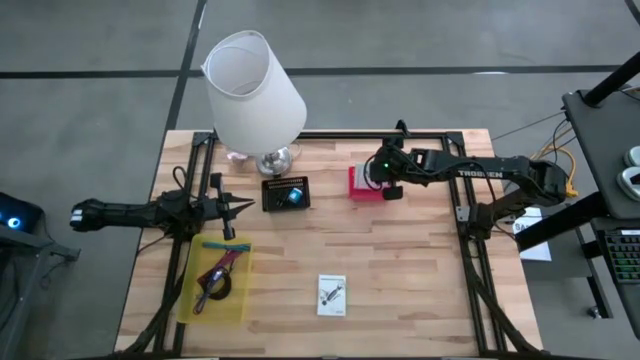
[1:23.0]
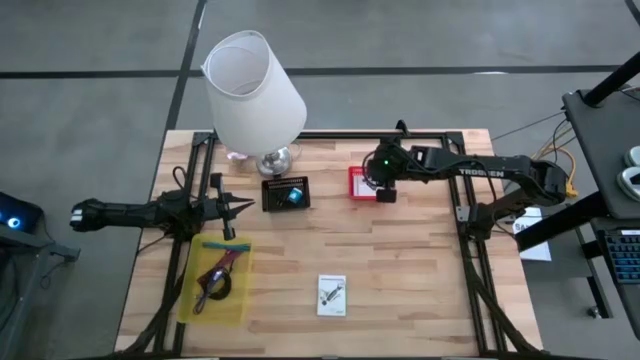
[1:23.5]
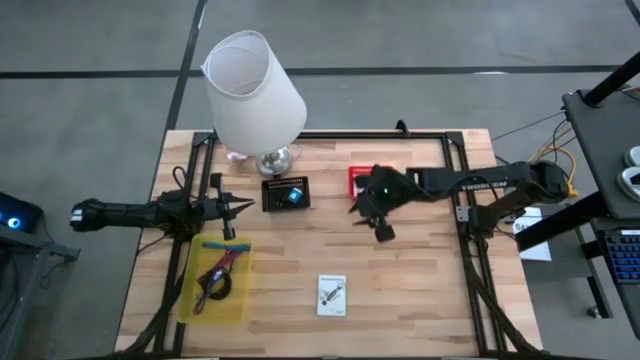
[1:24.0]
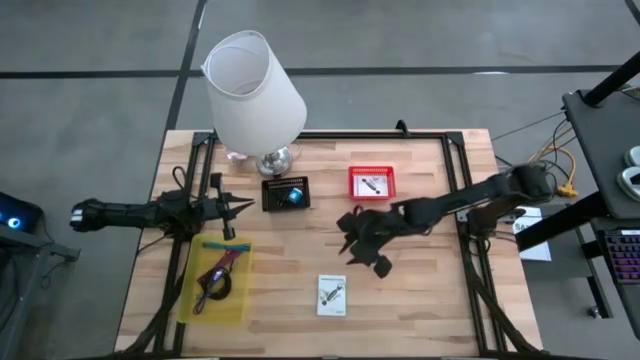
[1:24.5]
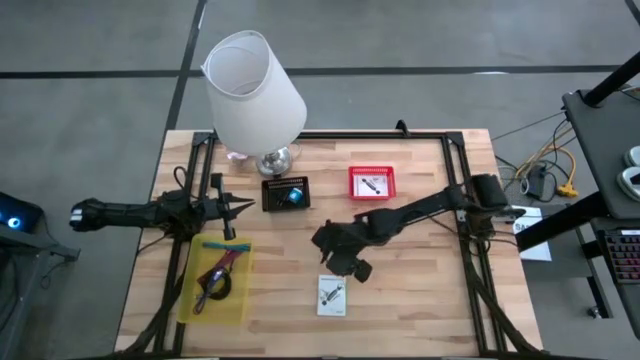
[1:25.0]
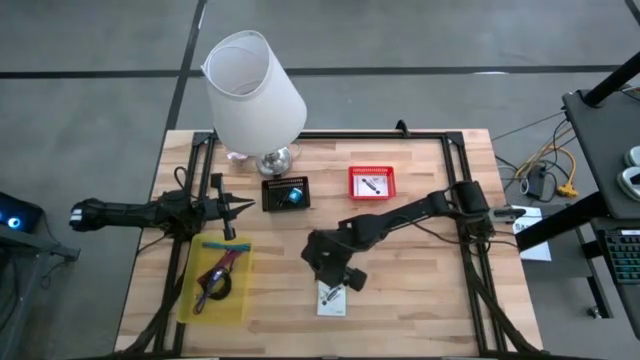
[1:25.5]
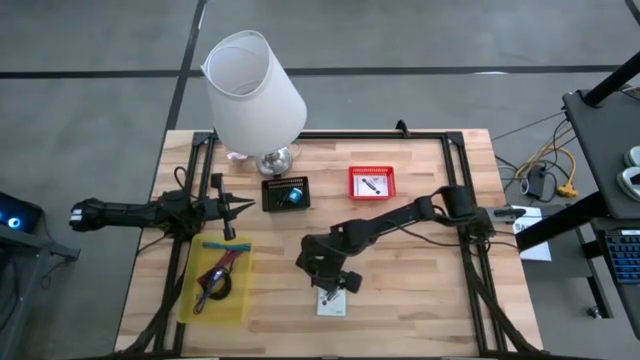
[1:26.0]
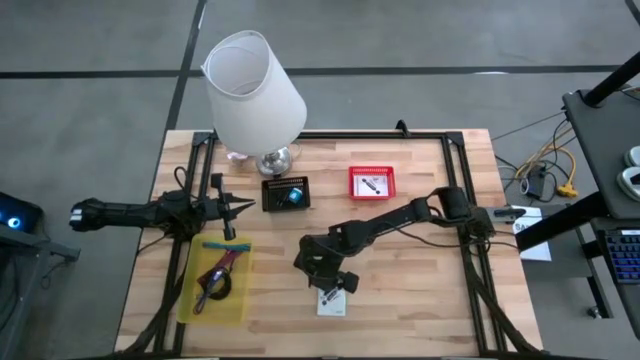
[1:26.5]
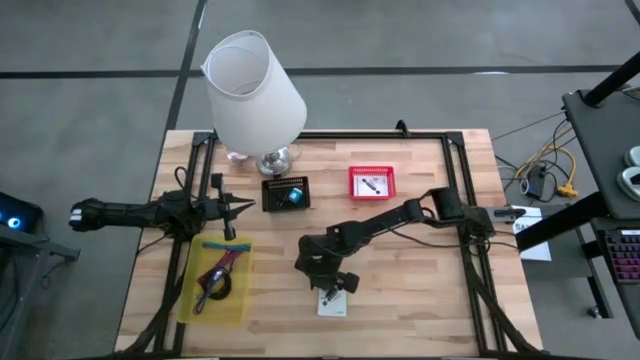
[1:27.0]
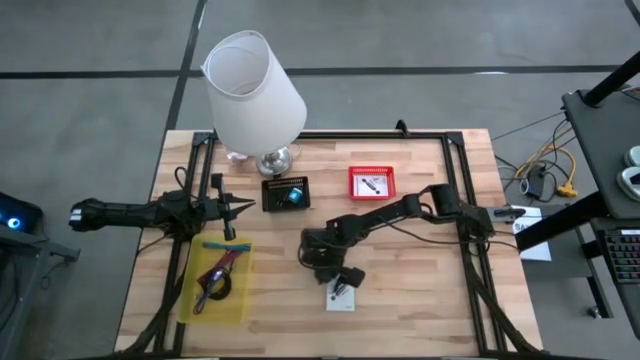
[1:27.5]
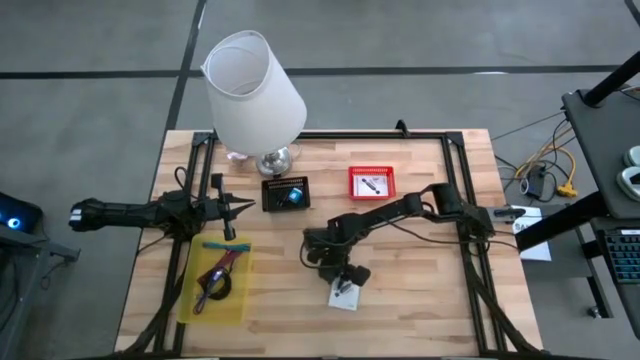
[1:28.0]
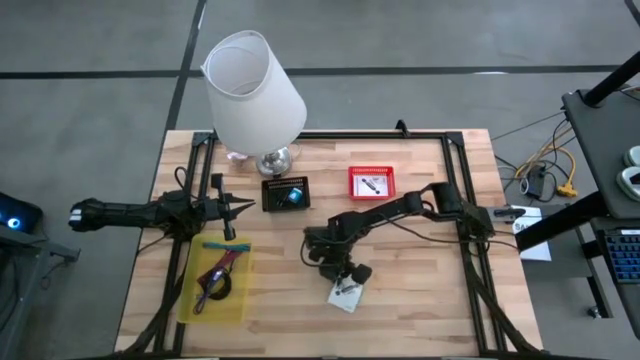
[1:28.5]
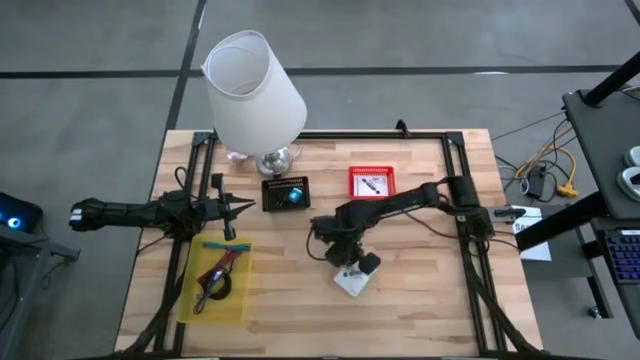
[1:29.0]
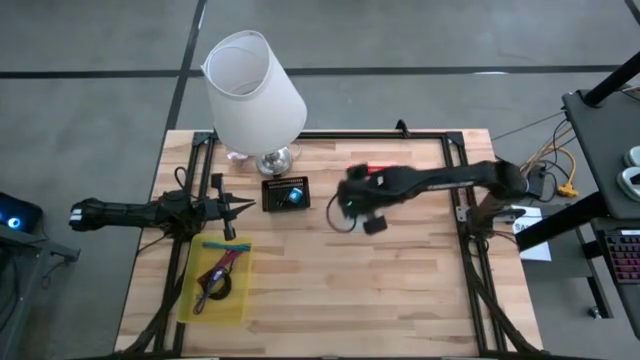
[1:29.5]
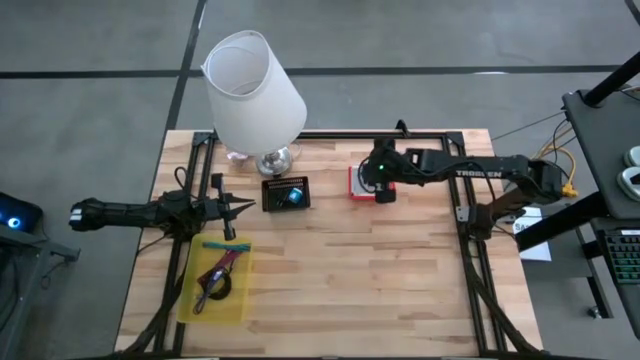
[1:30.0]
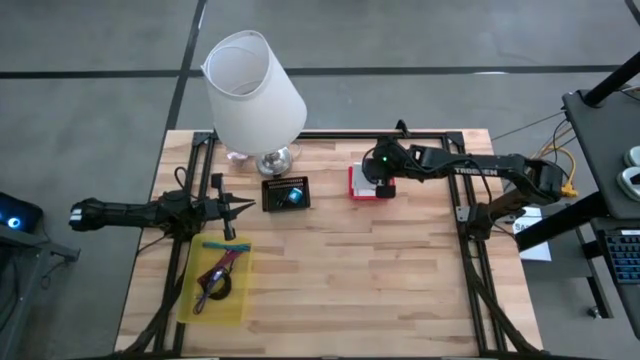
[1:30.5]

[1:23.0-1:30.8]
Task: Pick and place items into bin
Put the card reader box into the red bin

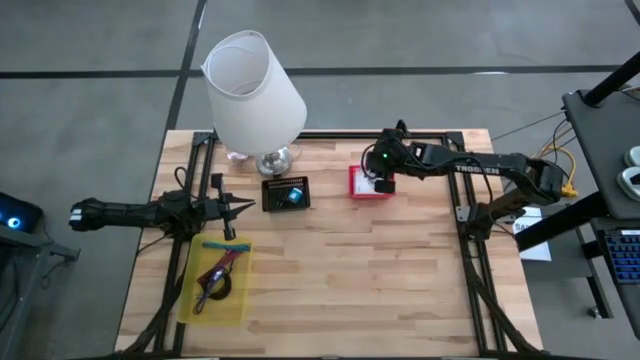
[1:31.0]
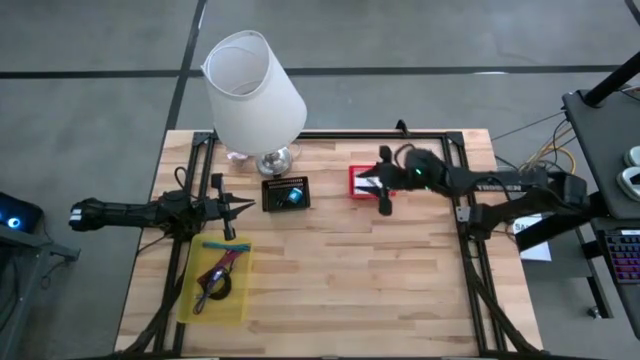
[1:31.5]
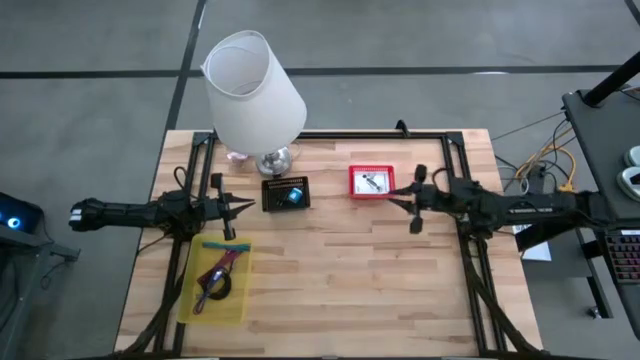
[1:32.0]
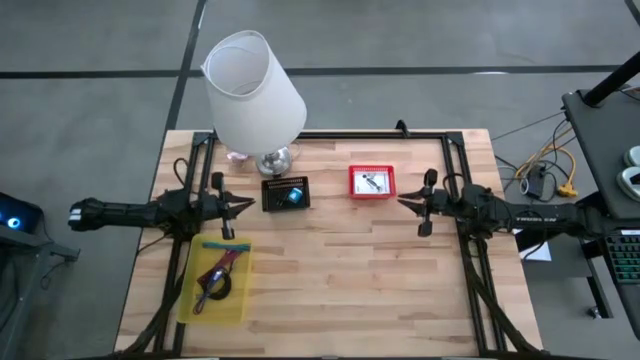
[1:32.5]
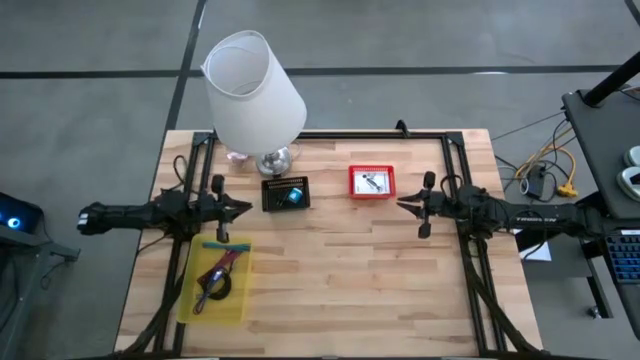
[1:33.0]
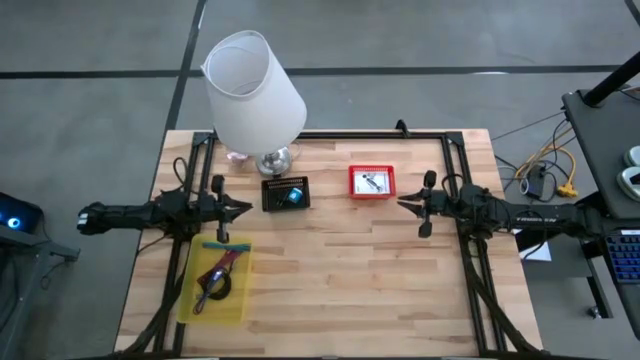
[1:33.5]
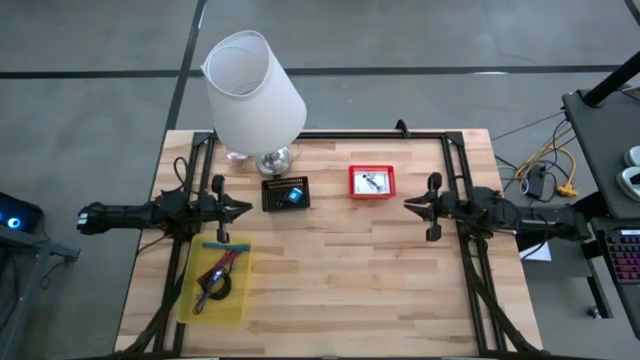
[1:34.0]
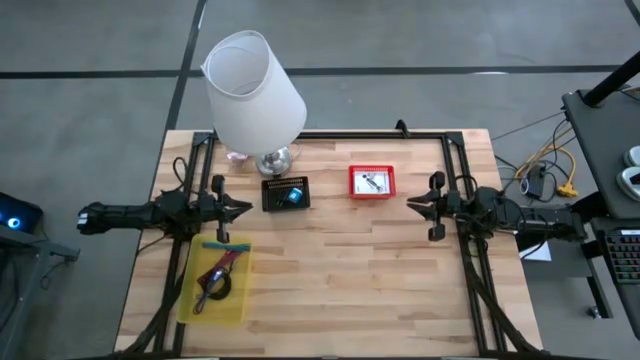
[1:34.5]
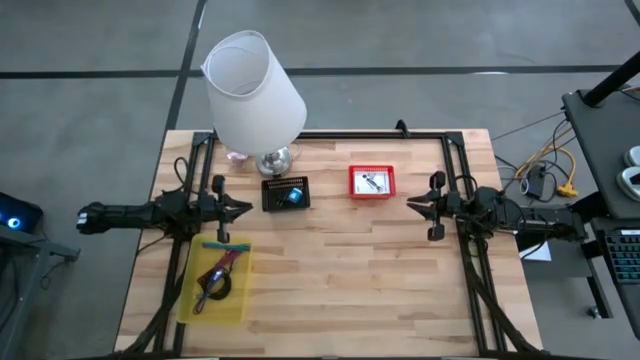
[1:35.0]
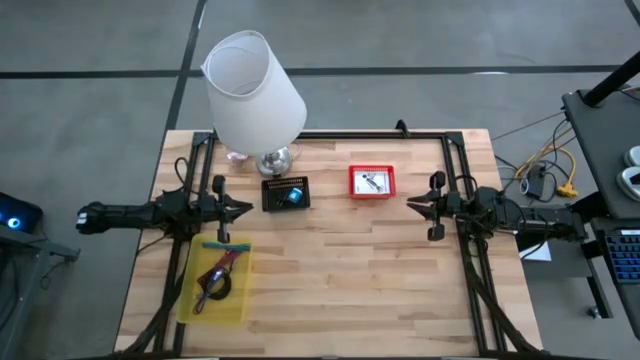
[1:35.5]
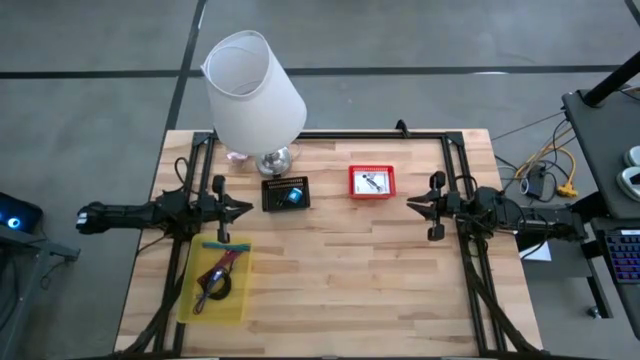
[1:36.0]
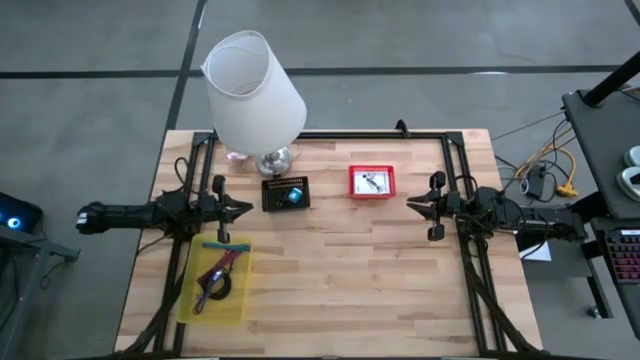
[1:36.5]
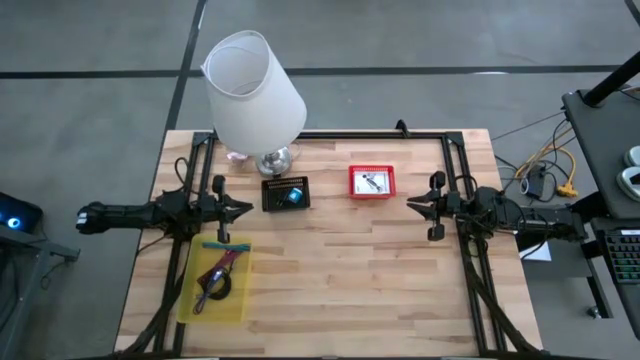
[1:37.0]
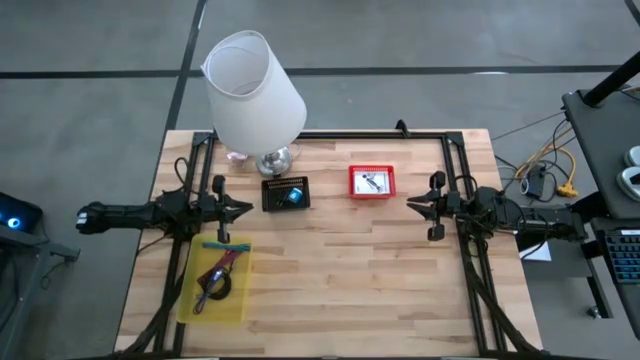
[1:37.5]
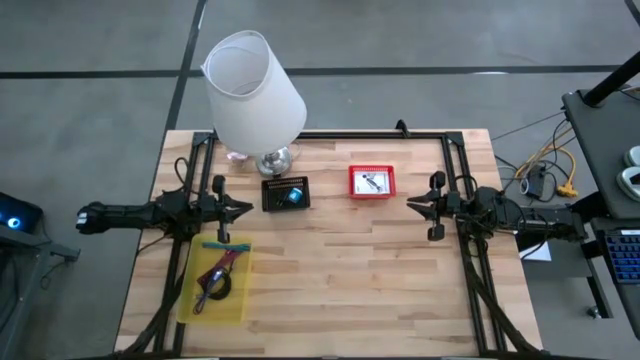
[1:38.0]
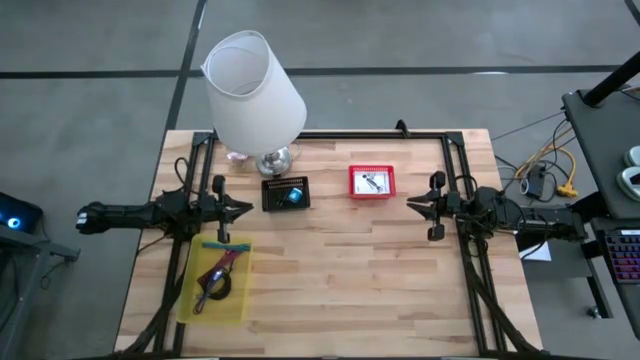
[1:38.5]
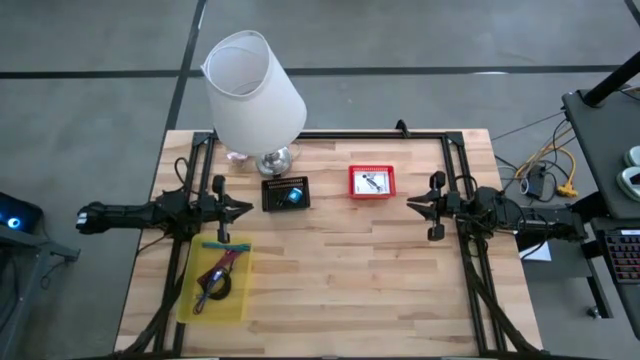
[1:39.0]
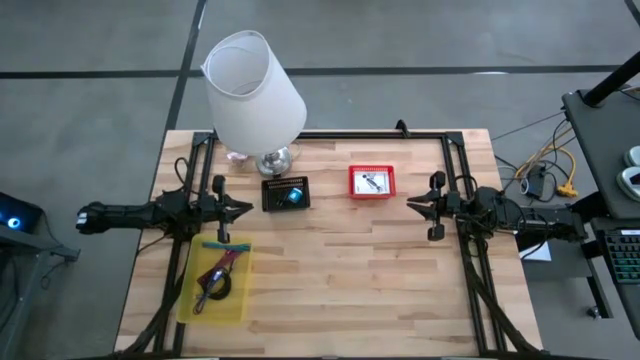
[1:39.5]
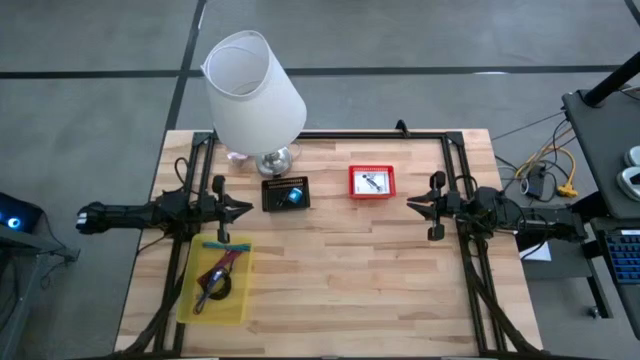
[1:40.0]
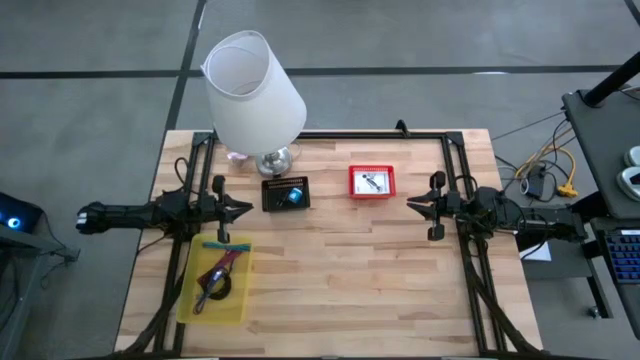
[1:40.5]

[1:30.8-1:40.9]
Return to Home Position

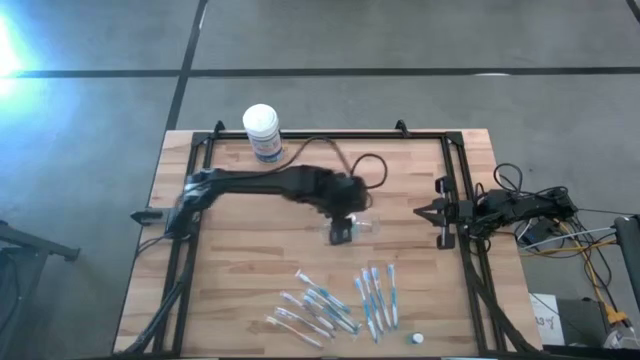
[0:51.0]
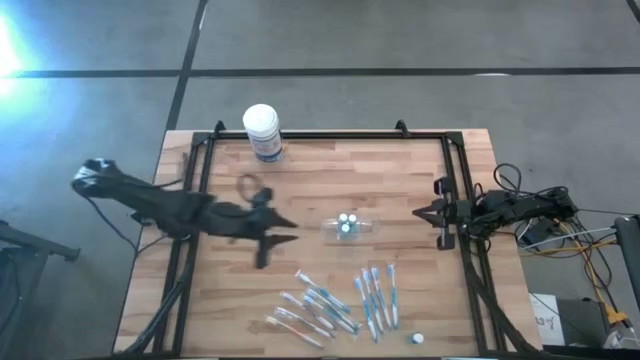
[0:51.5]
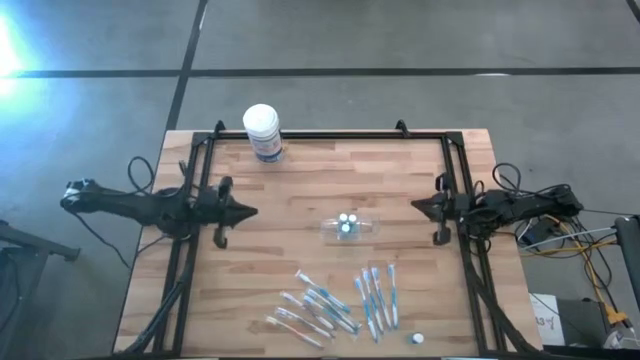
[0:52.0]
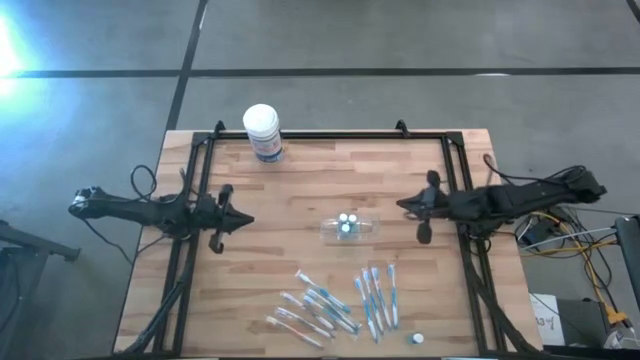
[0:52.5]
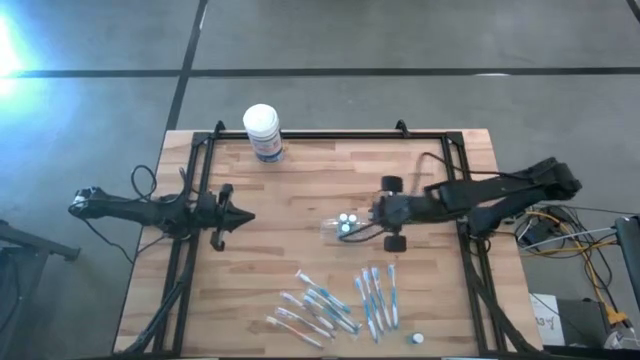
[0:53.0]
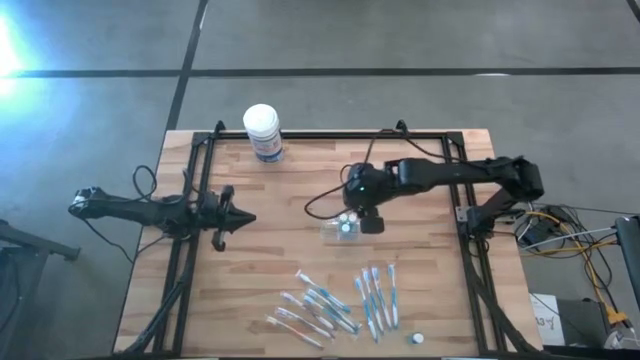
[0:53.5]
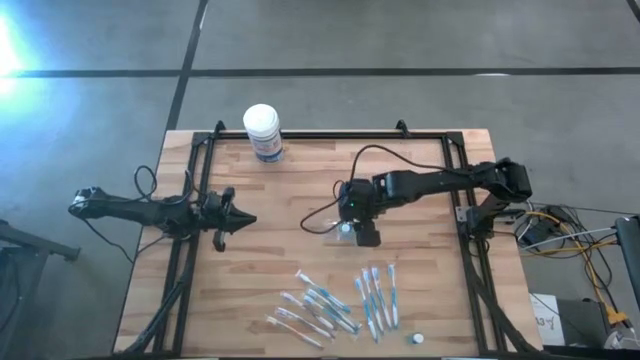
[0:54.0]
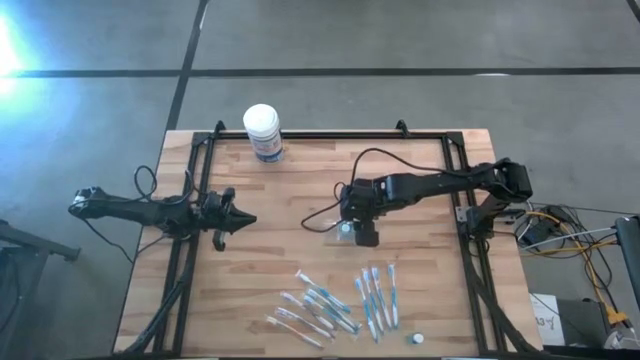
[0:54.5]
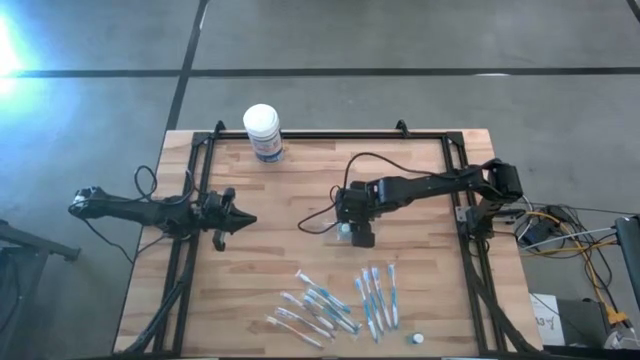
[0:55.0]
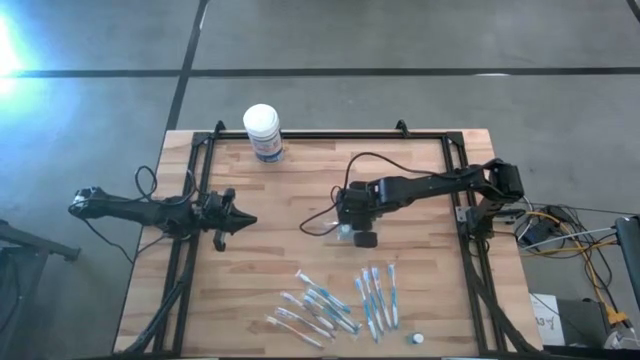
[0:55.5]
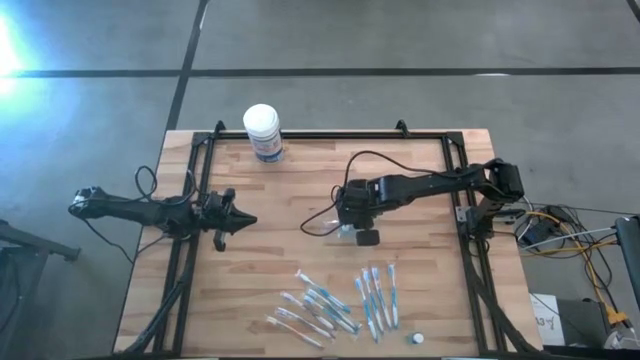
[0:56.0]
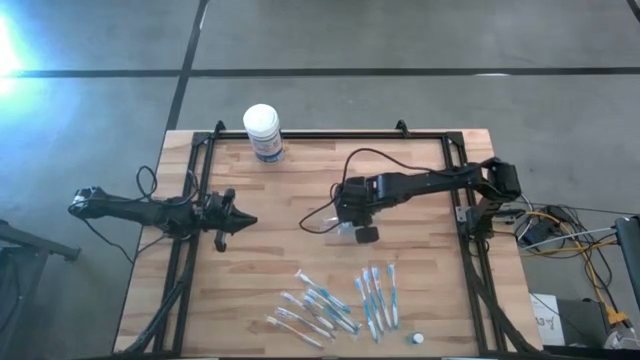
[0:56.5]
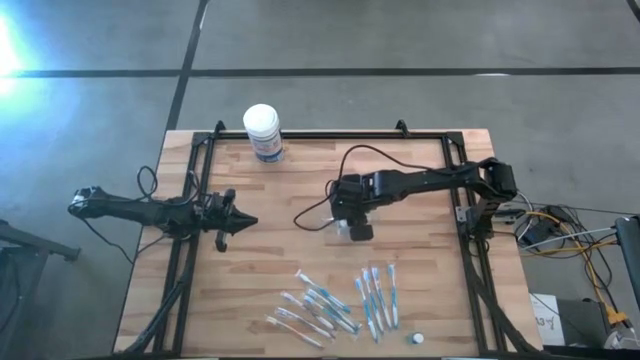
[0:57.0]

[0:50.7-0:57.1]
Task: Pick & Place toothbrushing station
Adjust the blue mouthwash in the transparent organizer
